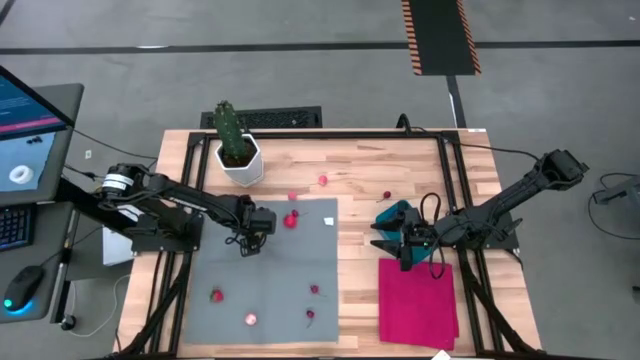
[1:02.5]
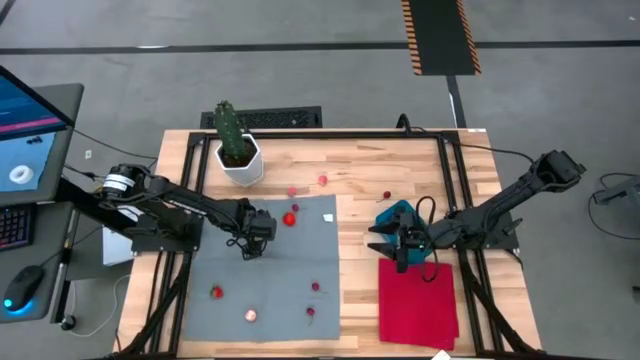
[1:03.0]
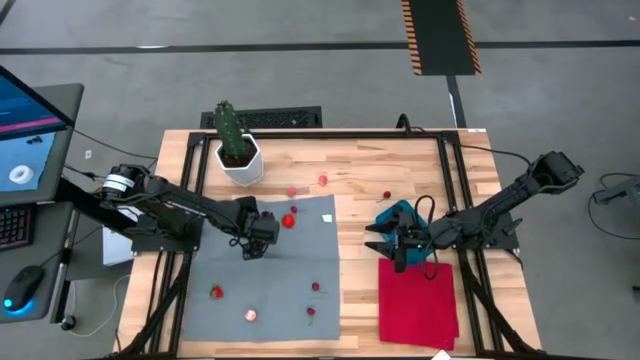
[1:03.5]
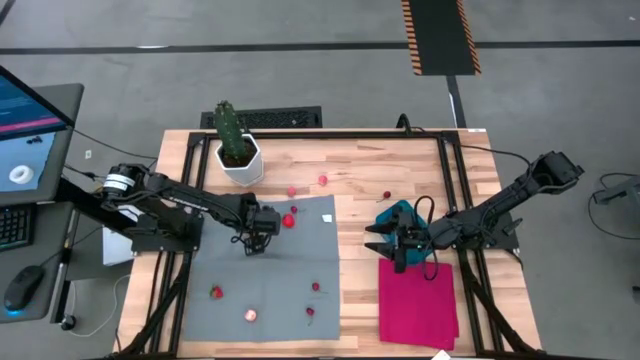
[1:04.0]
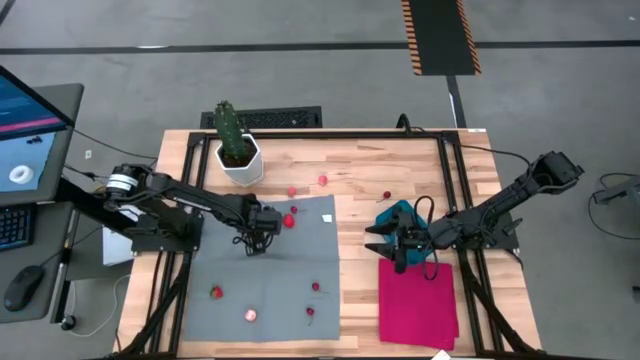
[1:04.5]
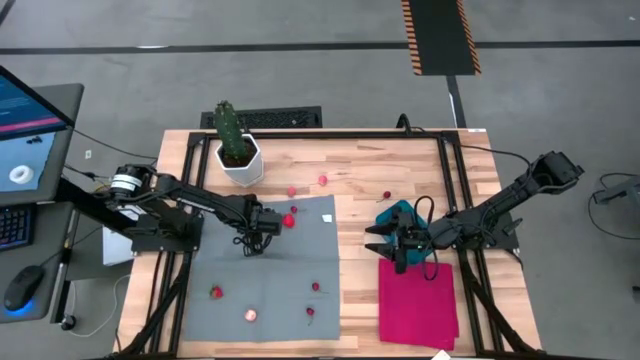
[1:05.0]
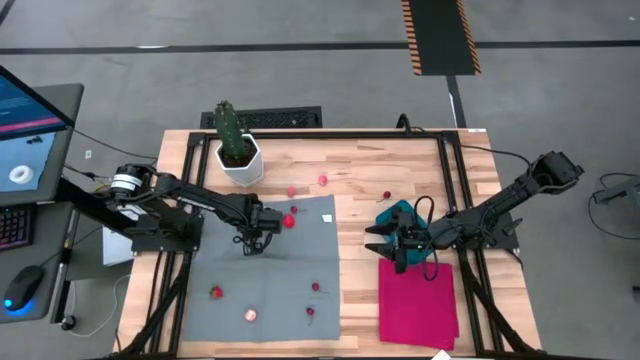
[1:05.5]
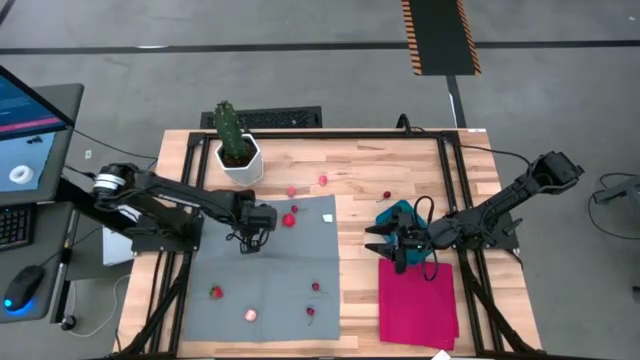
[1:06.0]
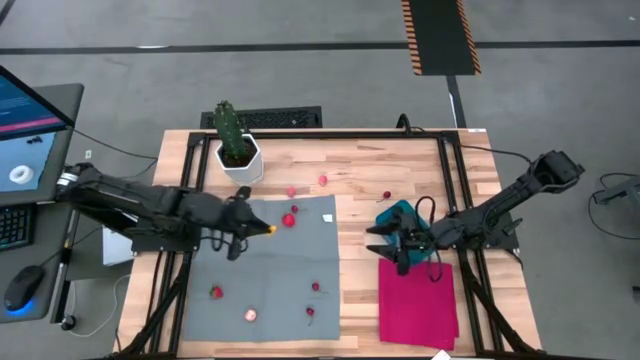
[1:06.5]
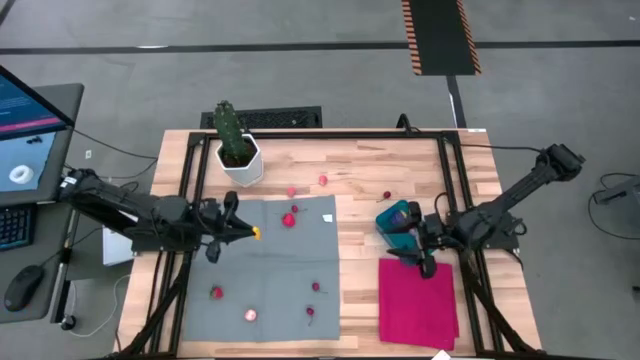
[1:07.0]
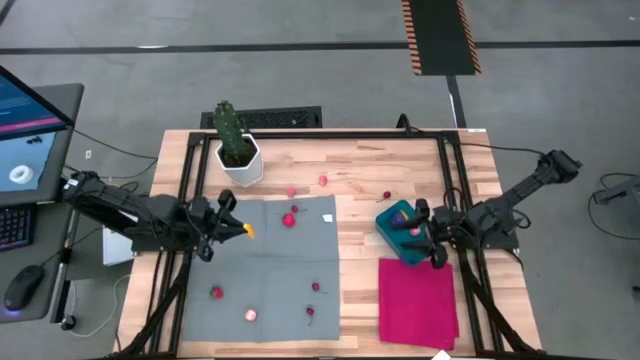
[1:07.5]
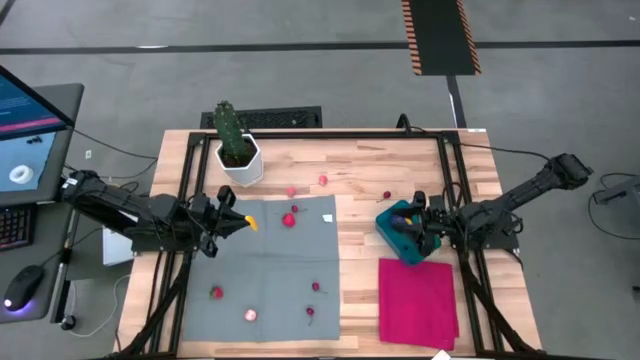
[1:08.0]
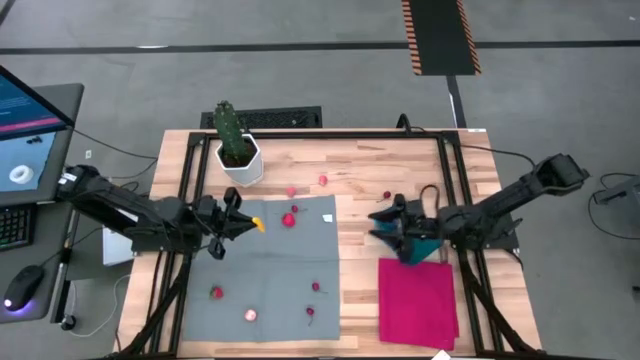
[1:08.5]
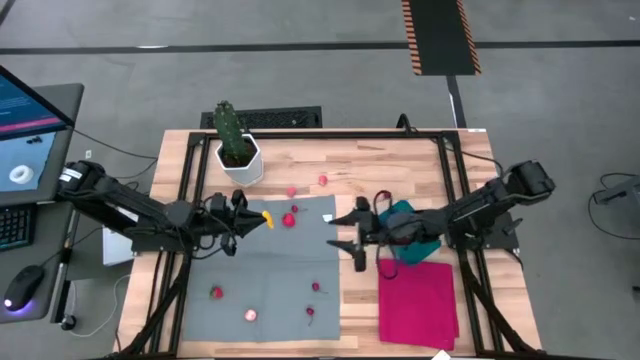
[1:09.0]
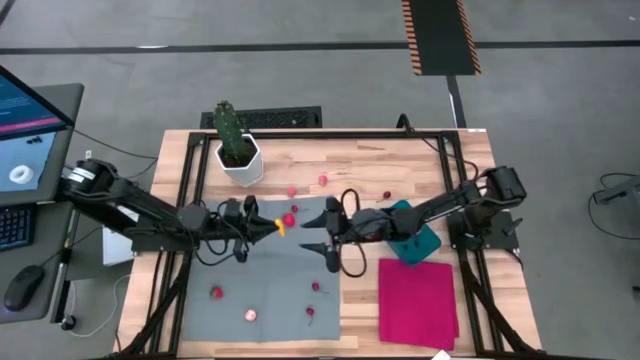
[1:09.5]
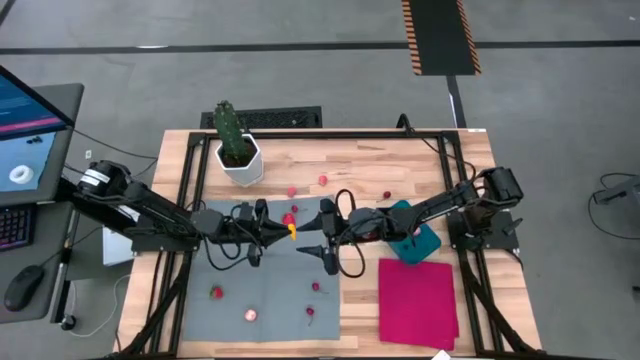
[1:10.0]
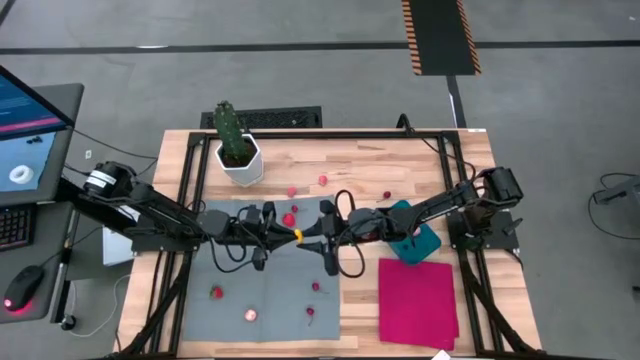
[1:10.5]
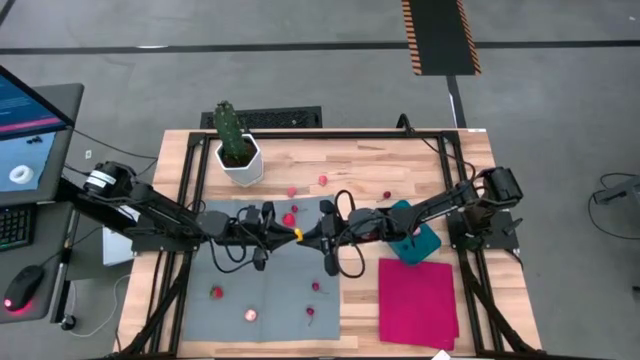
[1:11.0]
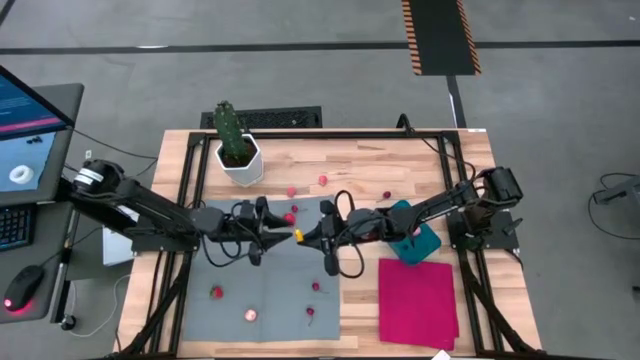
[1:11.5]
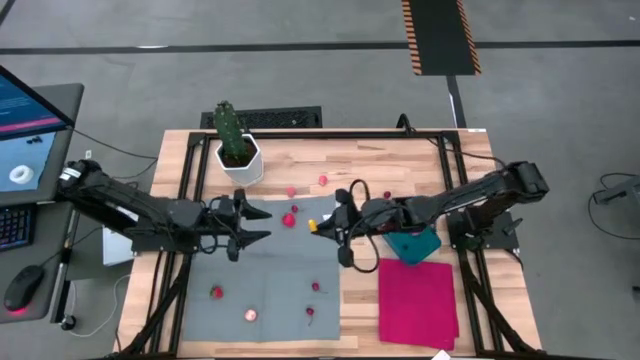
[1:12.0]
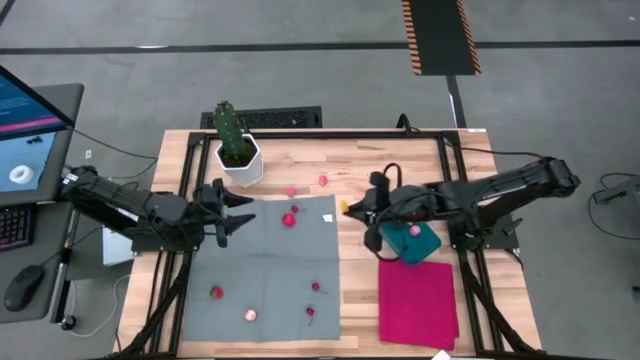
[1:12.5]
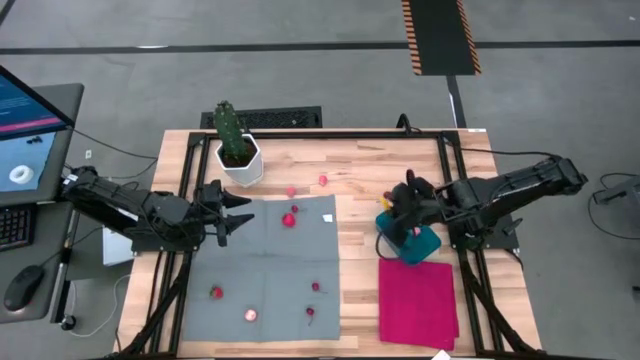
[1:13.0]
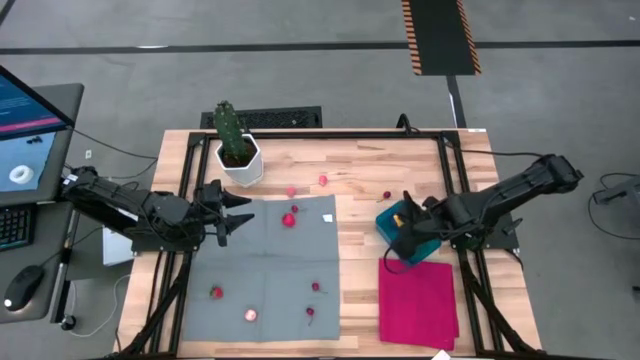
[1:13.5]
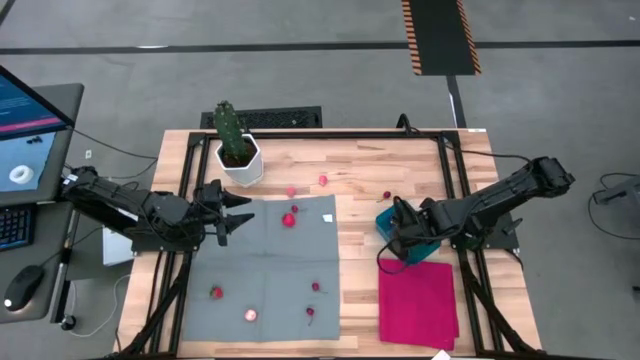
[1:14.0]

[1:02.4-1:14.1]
Task: Pick and placing Produce into tupperware
Put the yellow corn into the blue bin

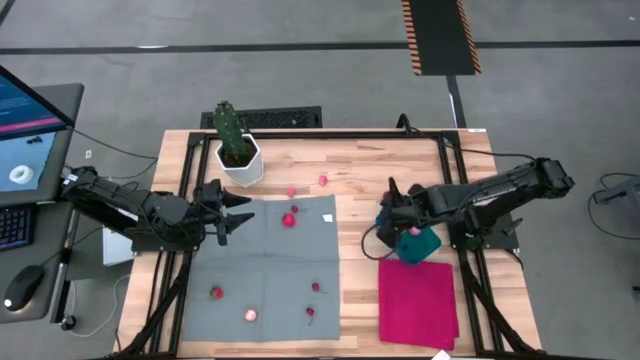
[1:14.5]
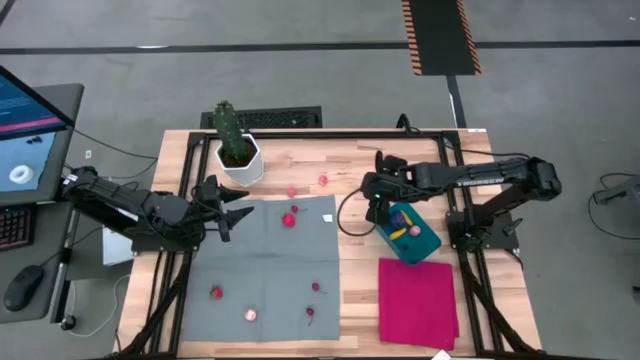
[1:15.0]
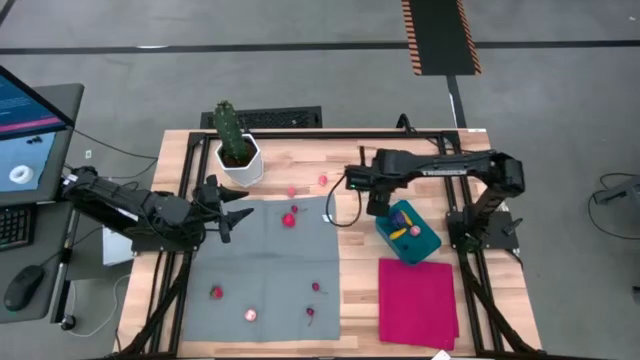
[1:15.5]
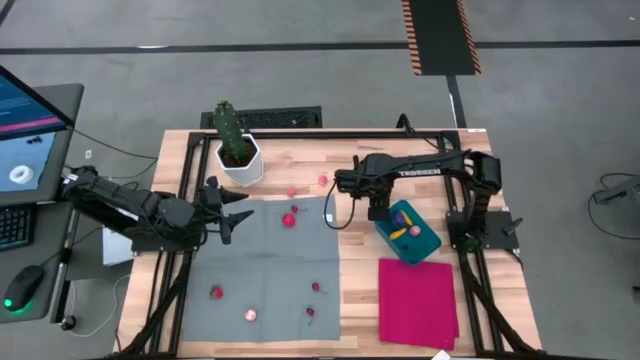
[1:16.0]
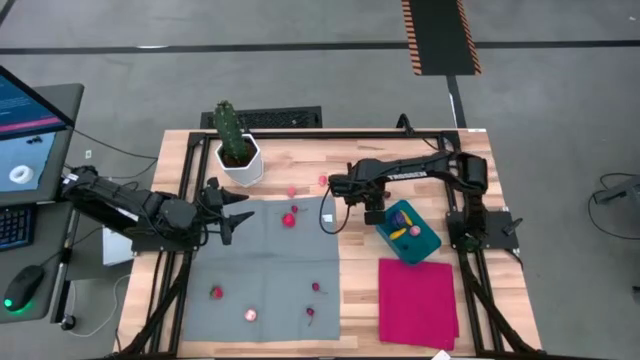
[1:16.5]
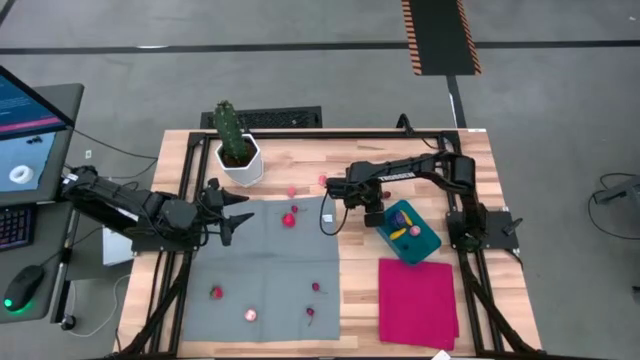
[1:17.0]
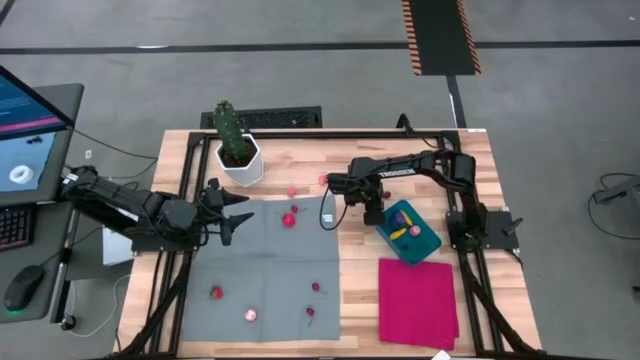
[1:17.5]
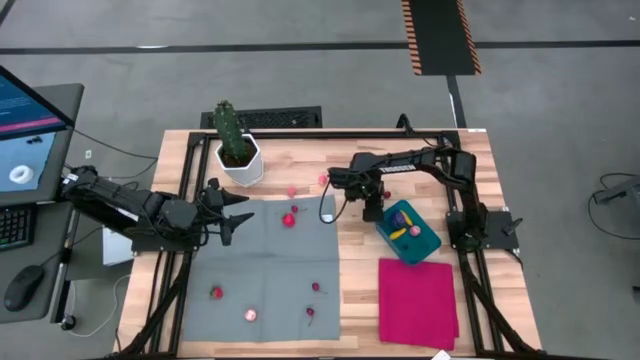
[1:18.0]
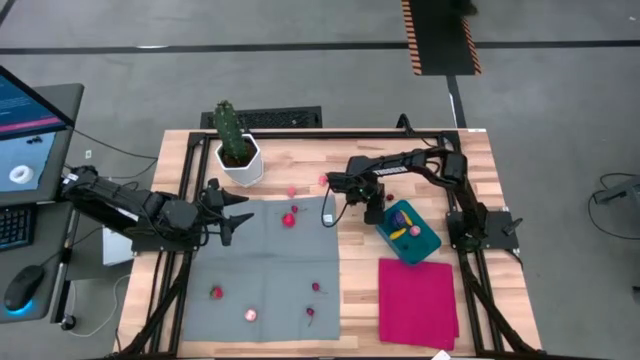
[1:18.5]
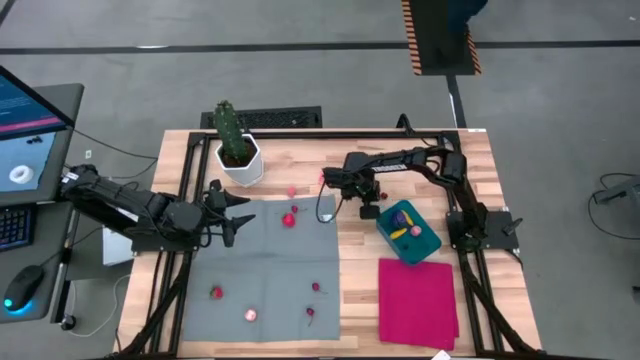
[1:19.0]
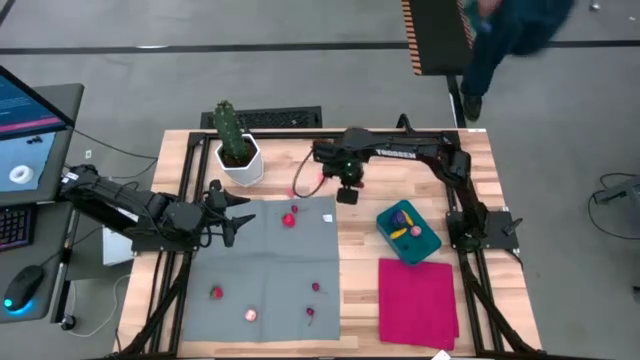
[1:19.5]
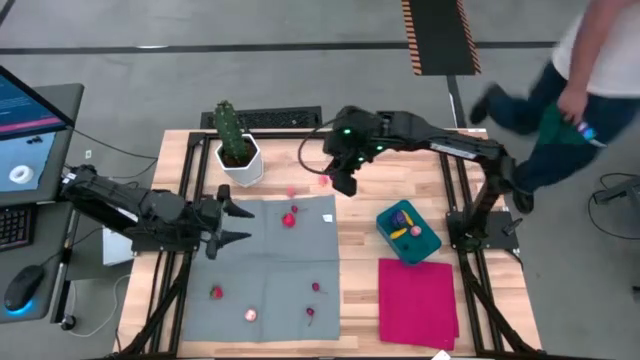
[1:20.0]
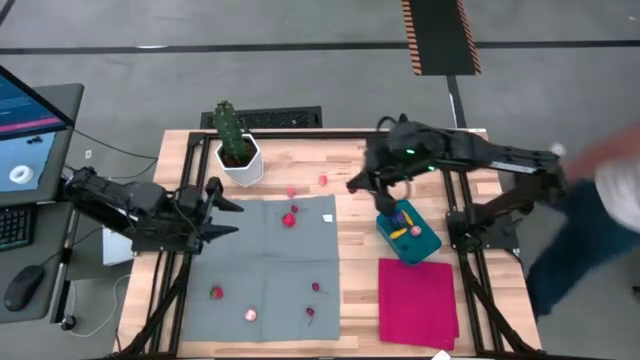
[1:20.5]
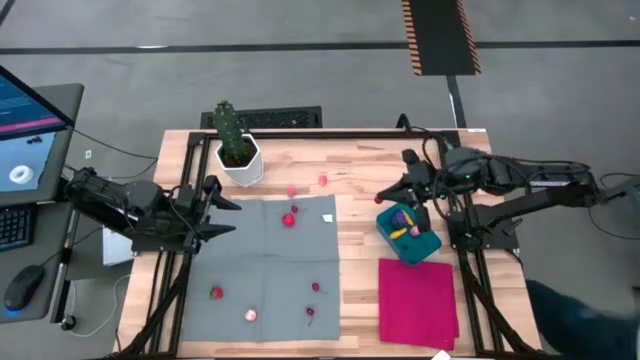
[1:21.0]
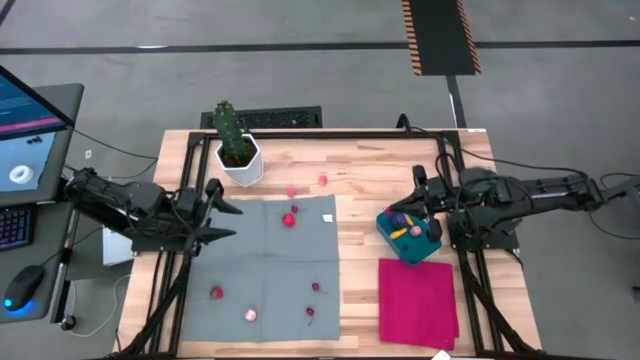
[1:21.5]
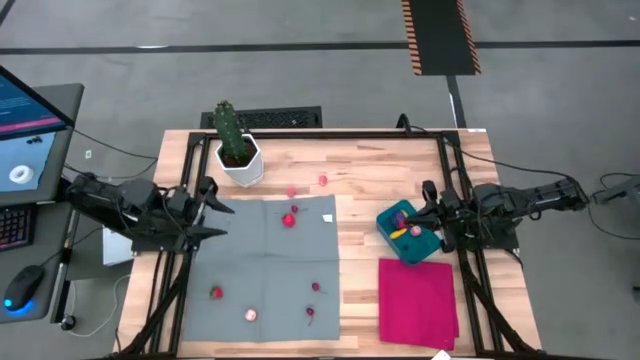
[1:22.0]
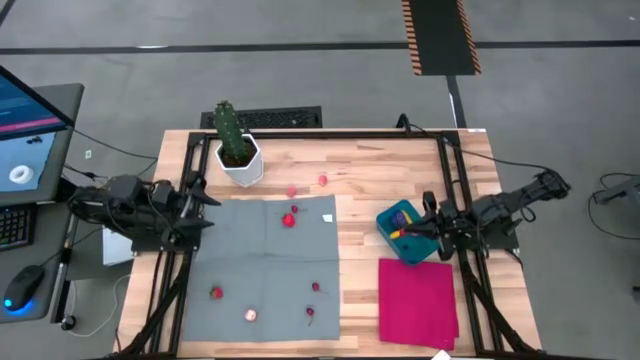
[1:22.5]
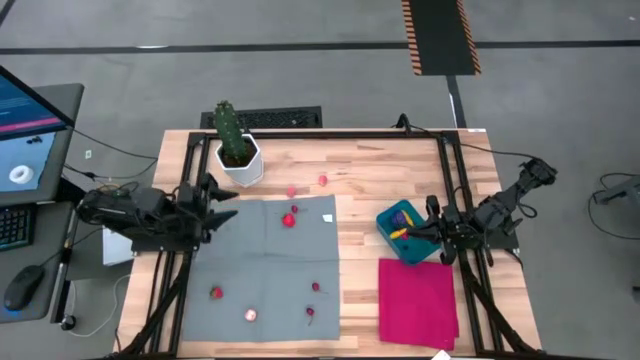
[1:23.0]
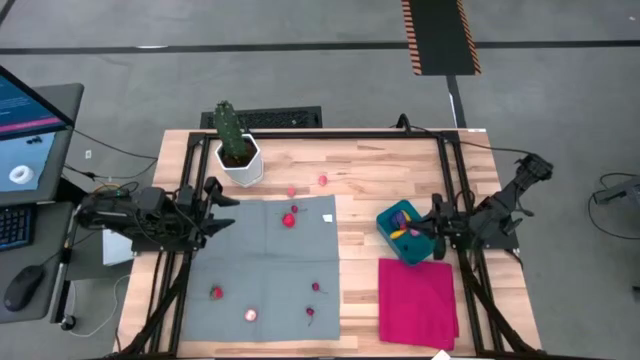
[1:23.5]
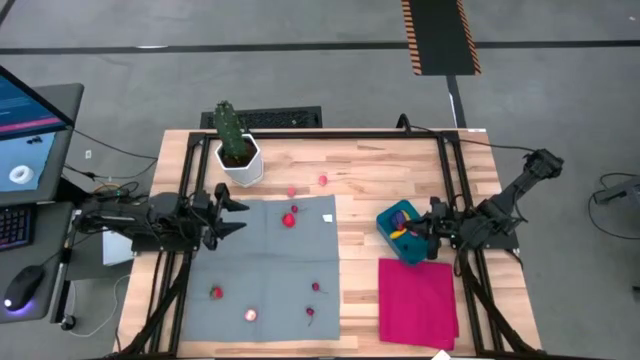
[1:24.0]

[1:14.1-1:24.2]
Put the red cherry into the blue bin
